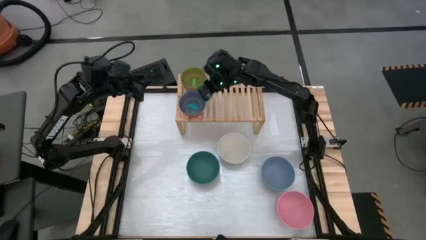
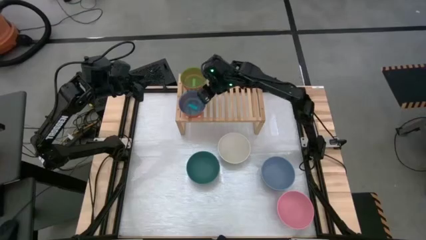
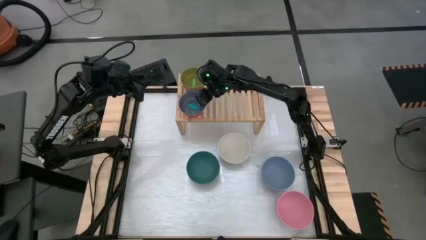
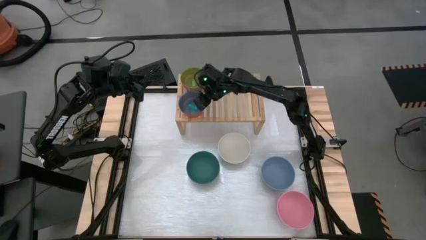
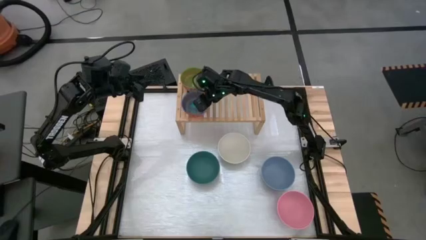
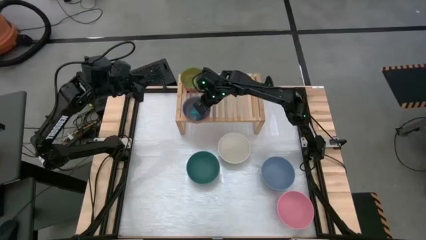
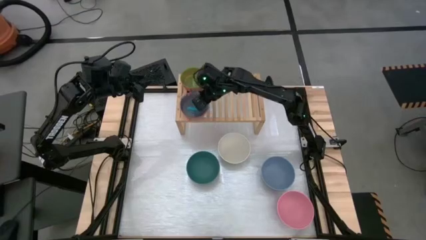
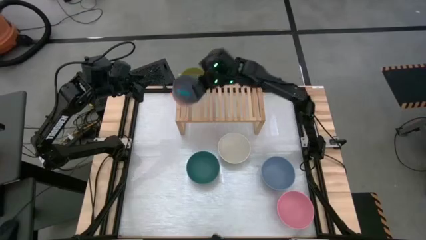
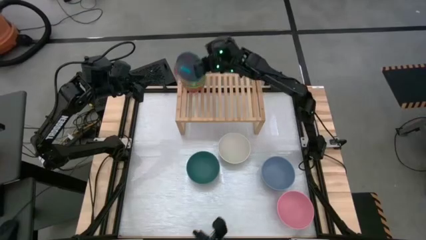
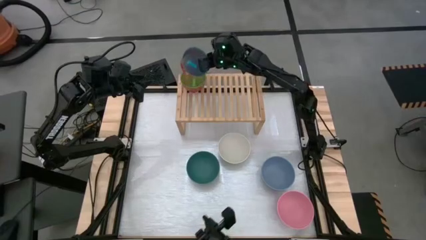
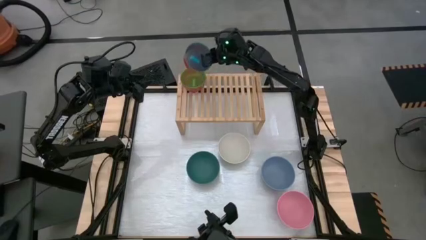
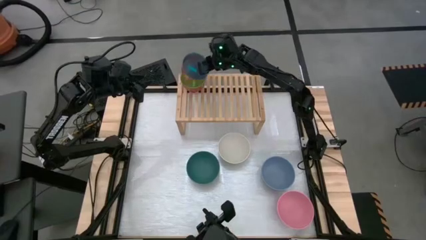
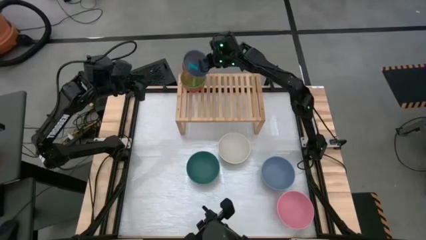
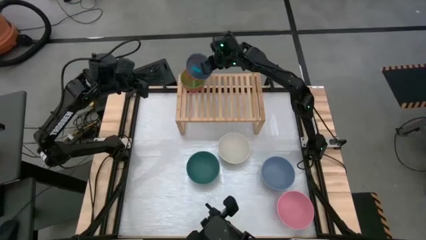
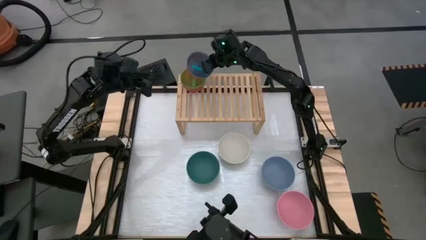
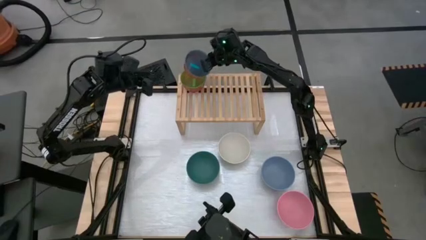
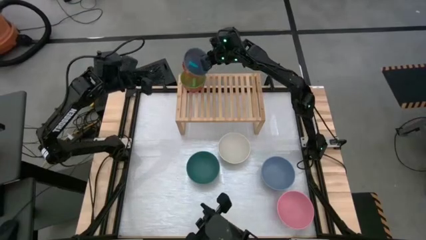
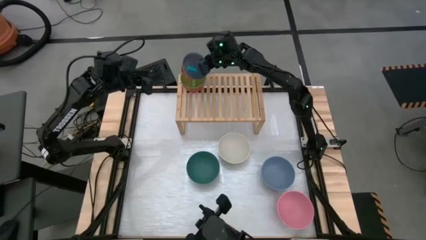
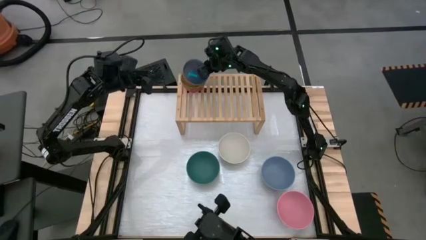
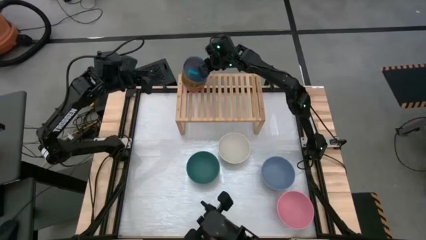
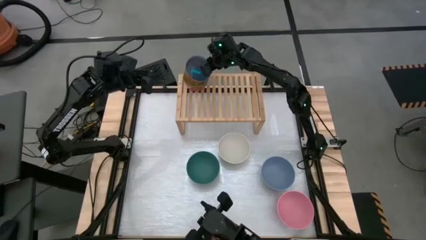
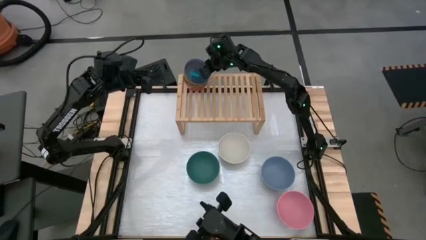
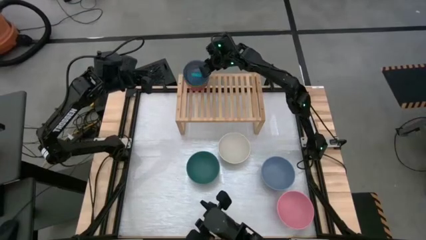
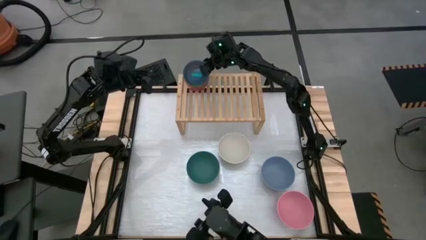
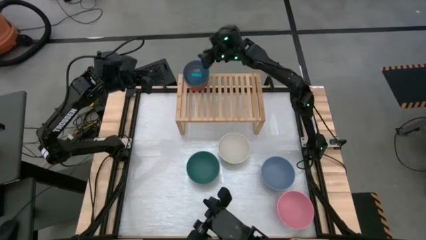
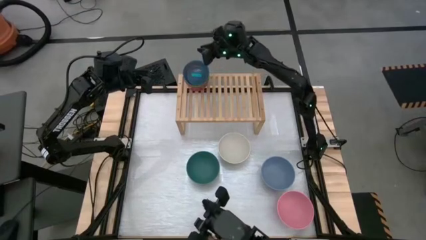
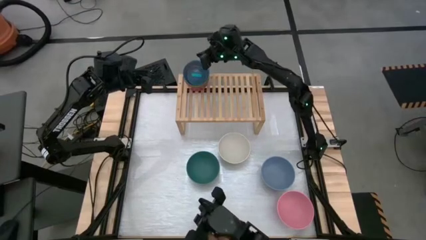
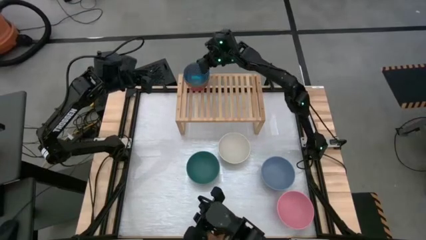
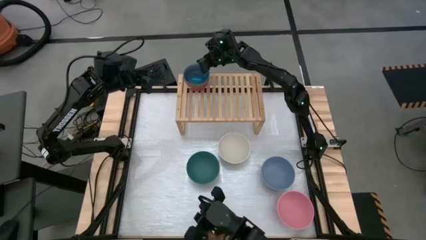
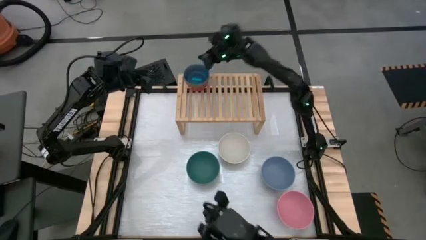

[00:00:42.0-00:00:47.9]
Task: Place and stack bowls onto a shelf
Stack the stacked bowls on top of the green bowl on the shelf

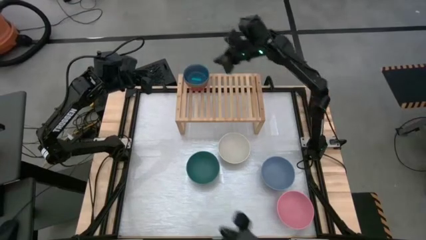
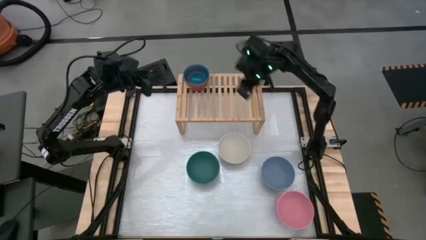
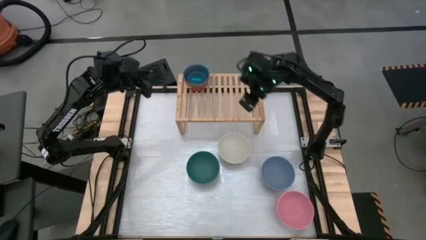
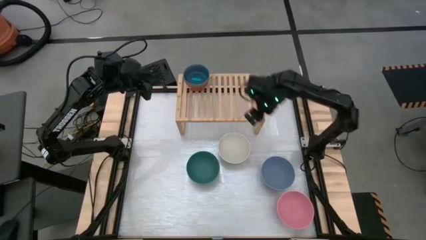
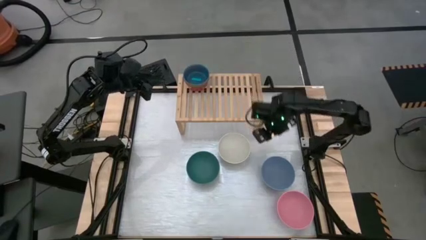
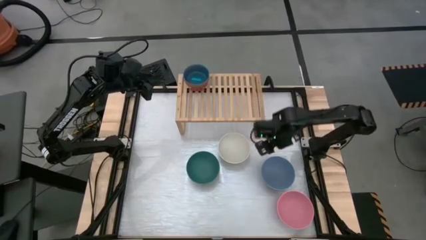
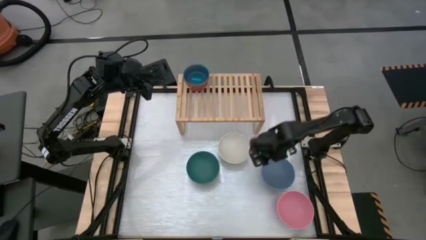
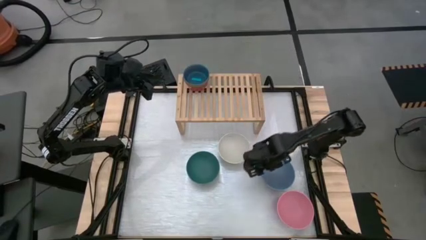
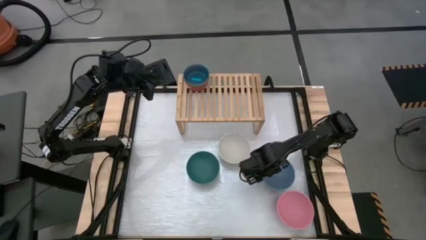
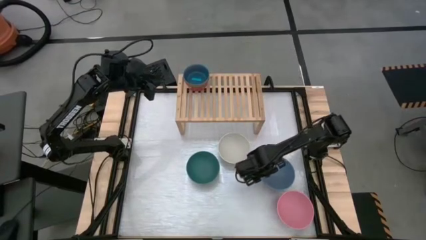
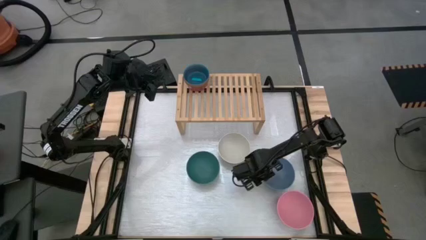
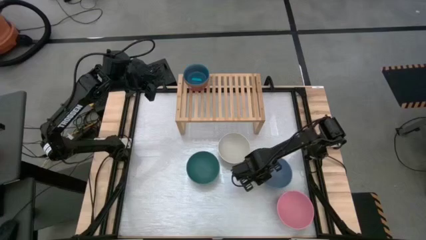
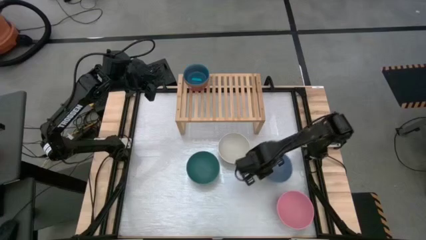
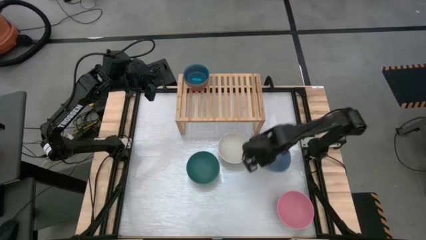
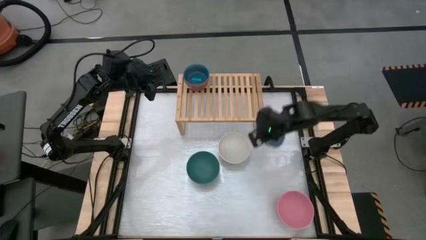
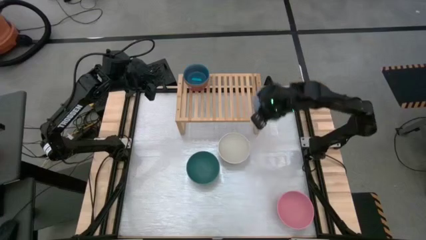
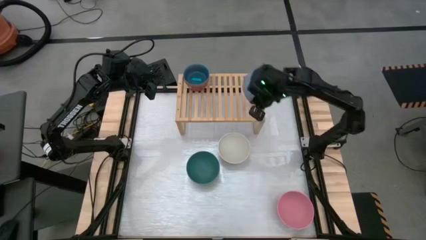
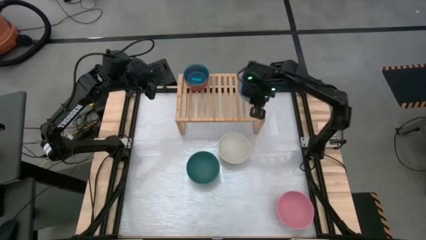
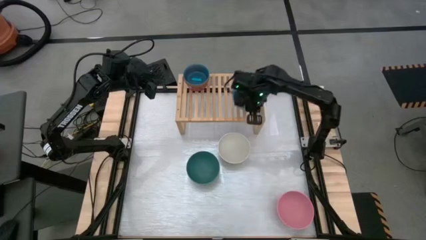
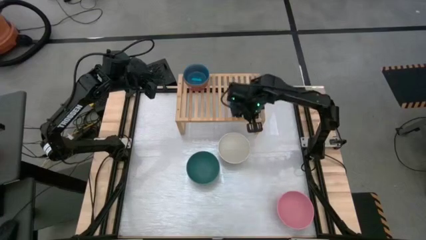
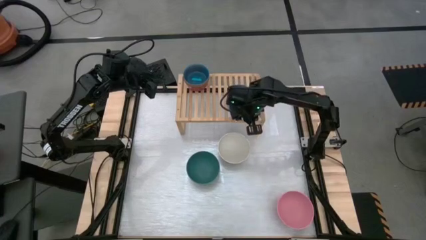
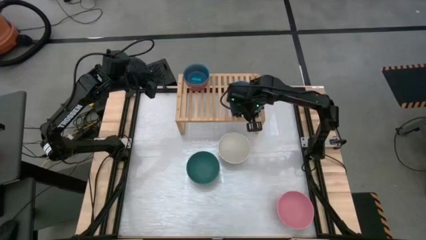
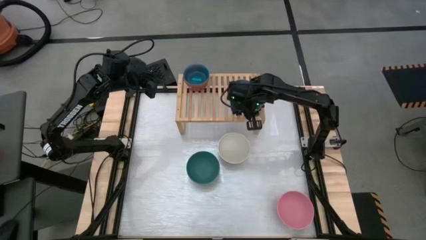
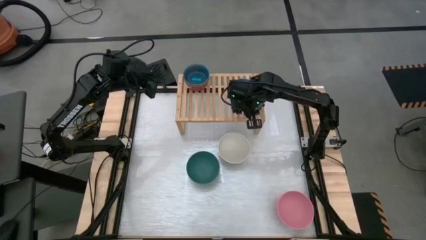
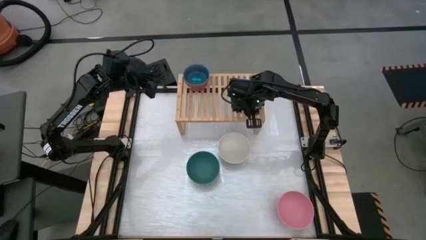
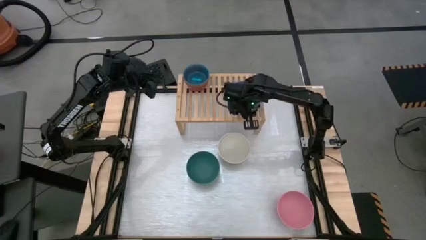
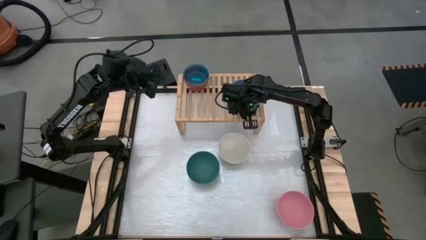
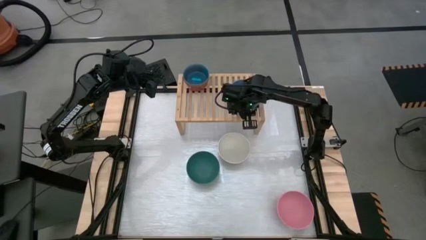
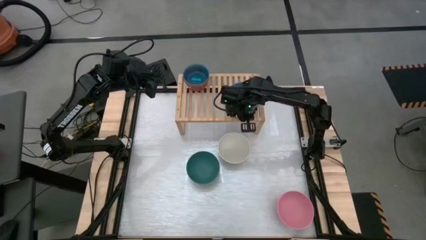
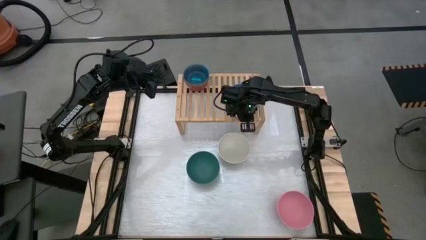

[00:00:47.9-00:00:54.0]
Put the blue bowl on the shelf

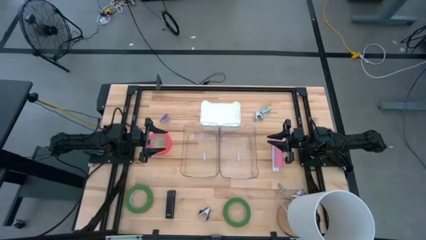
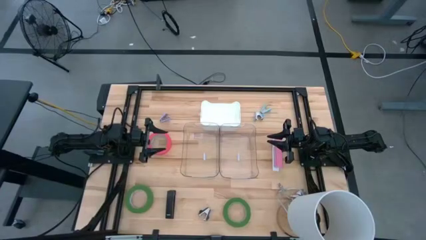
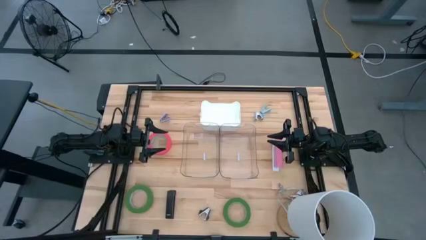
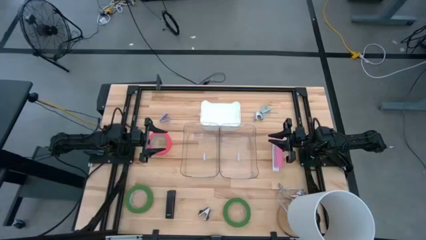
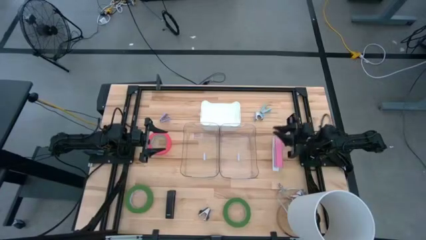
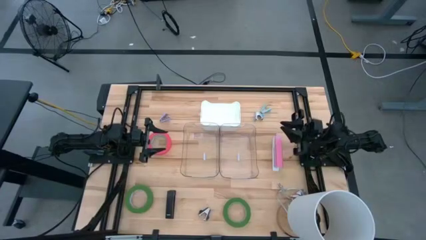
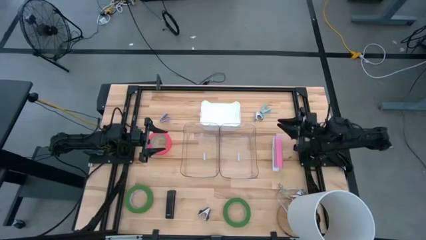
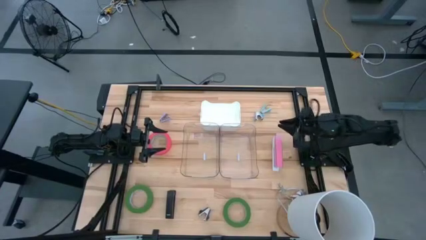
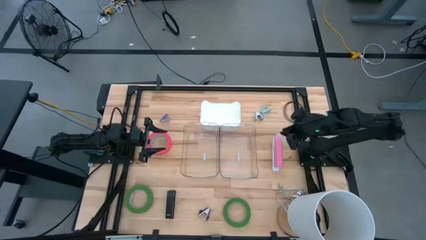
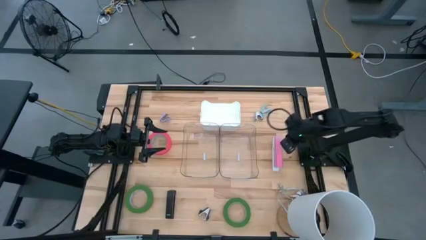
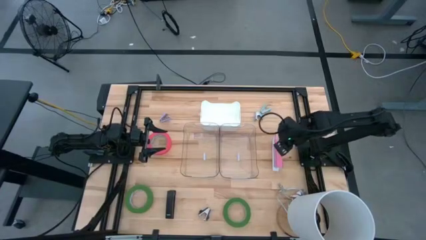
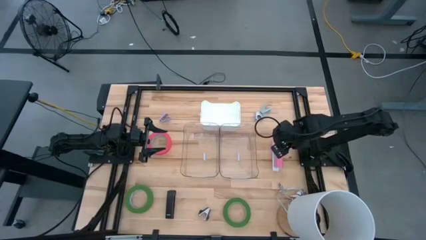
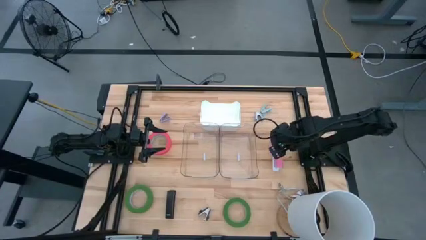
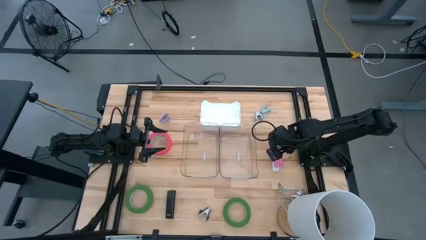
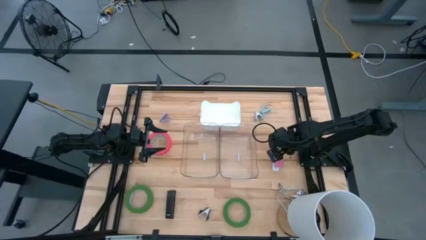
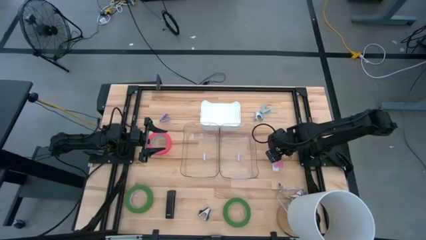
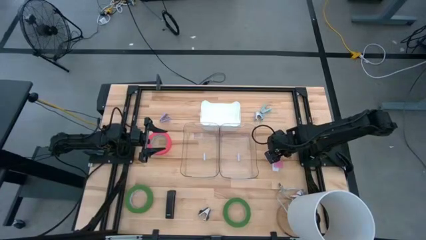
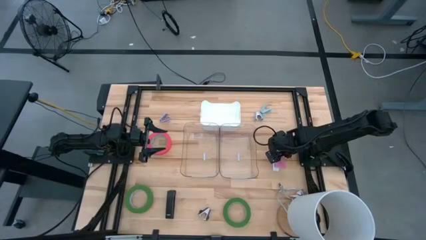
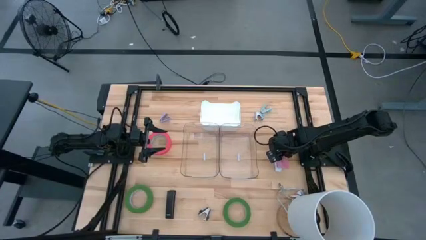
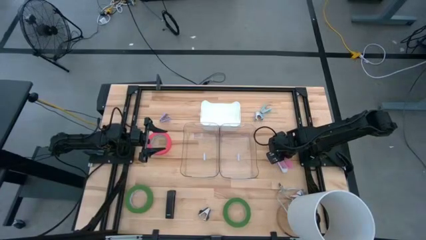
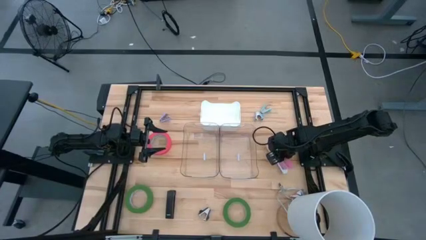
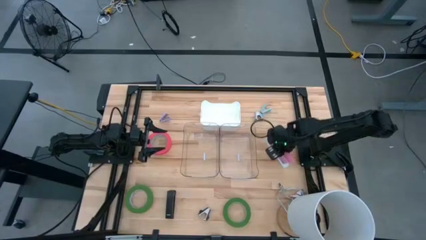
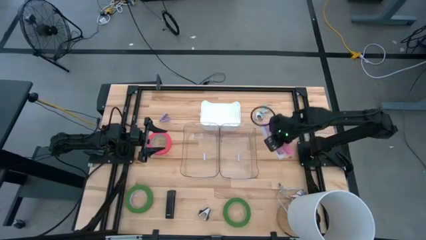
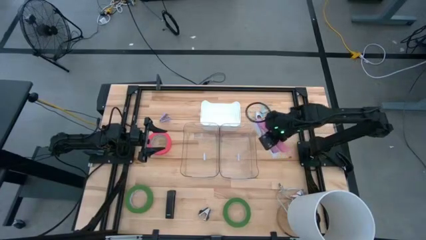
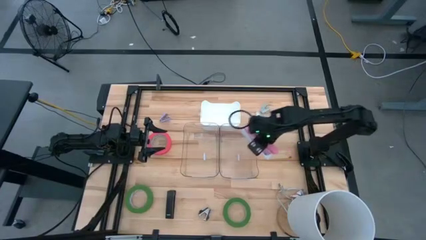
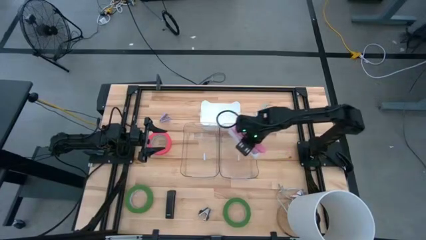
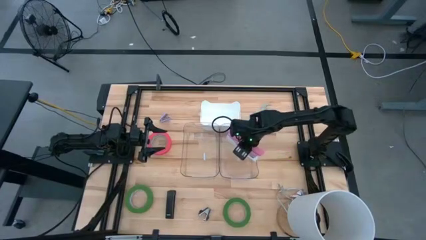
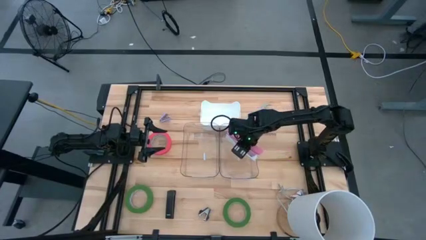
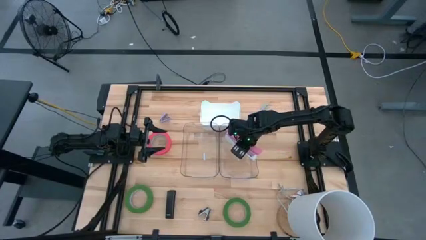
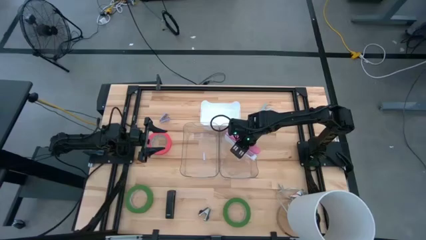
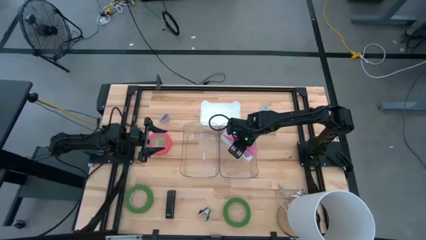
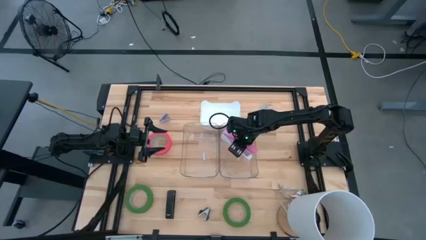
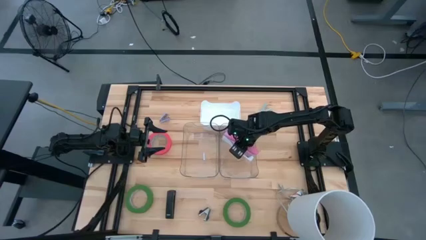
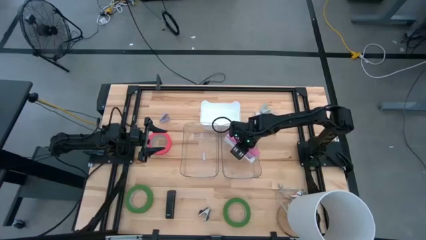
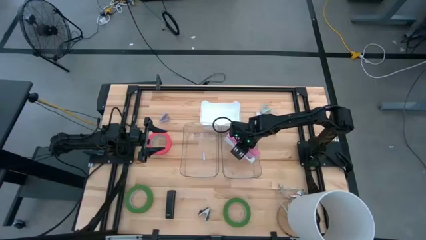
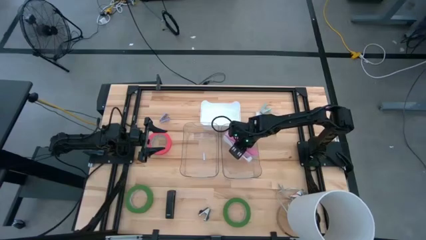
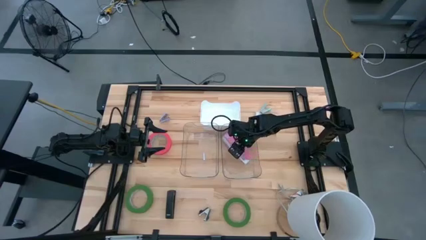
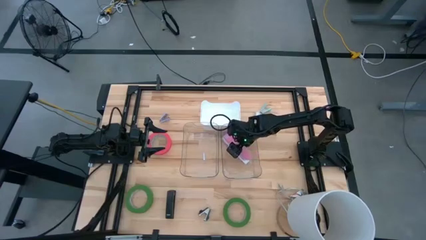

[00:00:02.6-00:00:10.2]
Task: Pick and place Stapler, Stapler remover, tape
Put the pink stapler into the right transparent bin
